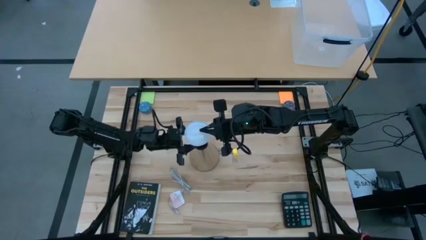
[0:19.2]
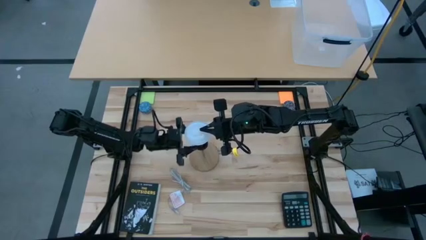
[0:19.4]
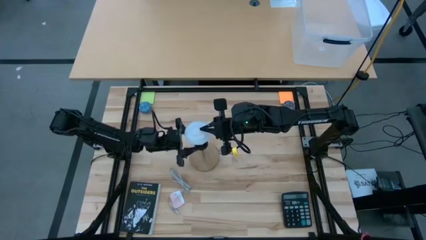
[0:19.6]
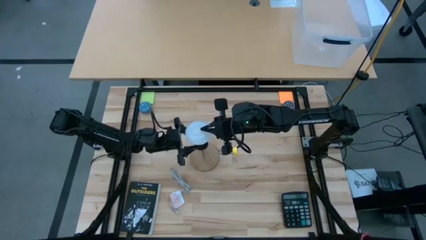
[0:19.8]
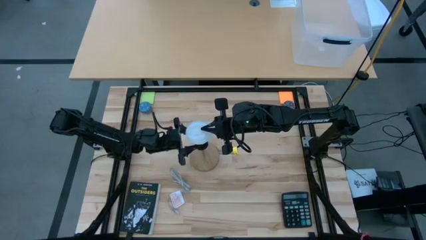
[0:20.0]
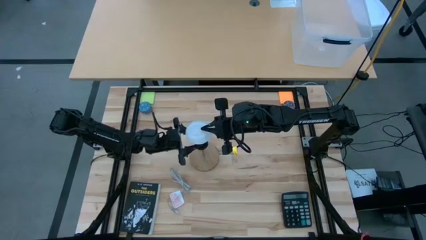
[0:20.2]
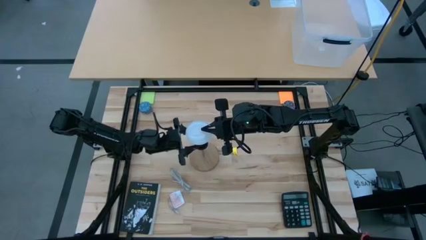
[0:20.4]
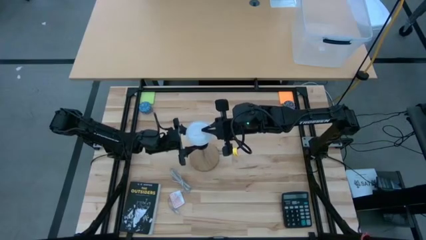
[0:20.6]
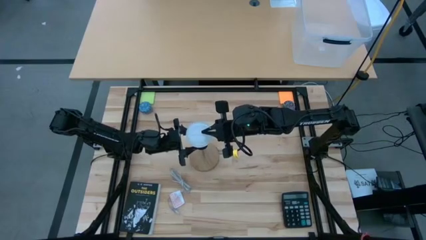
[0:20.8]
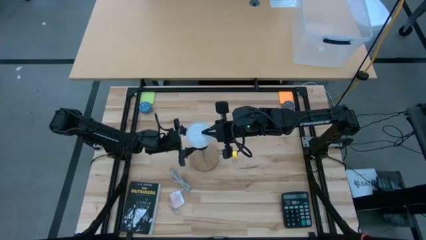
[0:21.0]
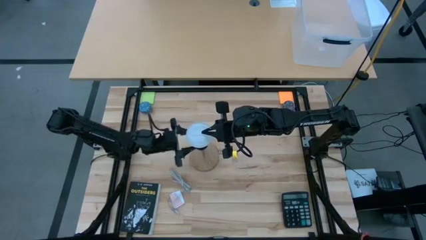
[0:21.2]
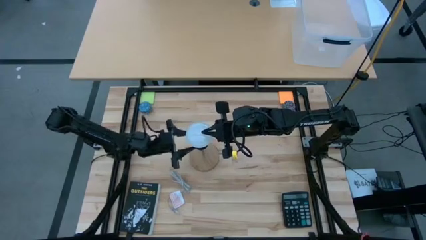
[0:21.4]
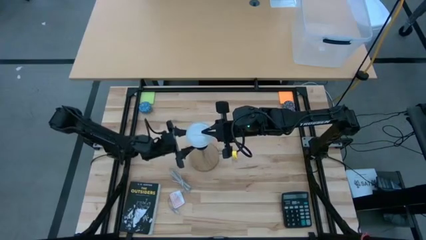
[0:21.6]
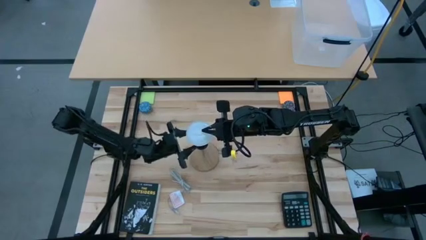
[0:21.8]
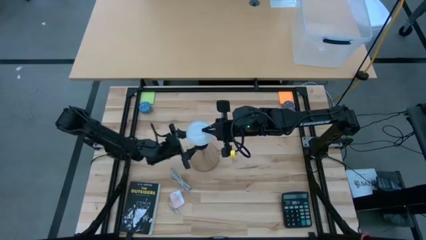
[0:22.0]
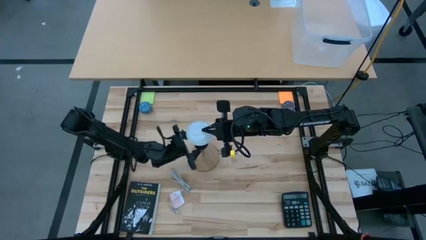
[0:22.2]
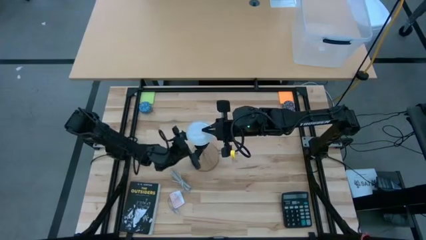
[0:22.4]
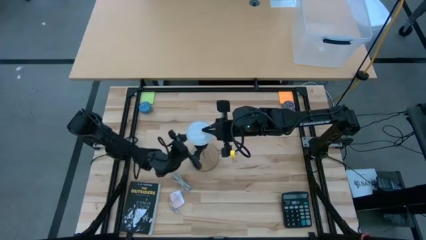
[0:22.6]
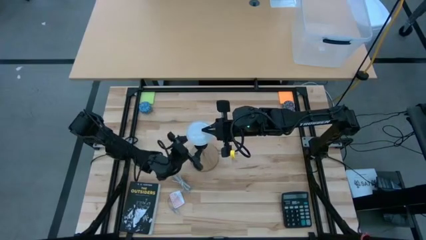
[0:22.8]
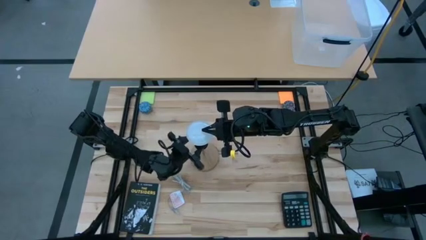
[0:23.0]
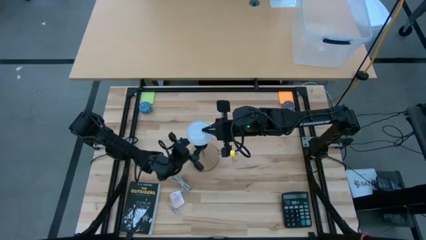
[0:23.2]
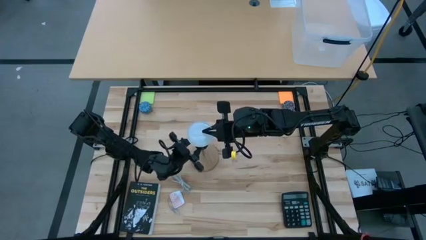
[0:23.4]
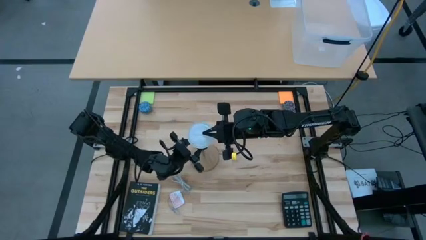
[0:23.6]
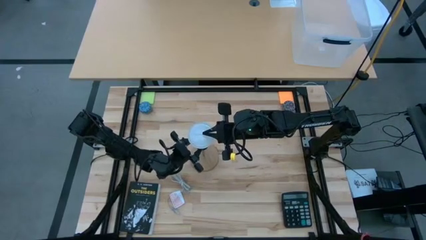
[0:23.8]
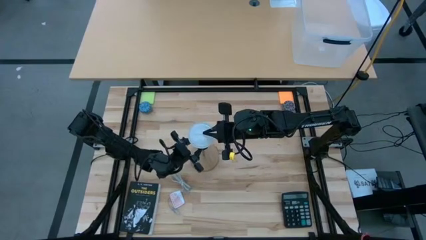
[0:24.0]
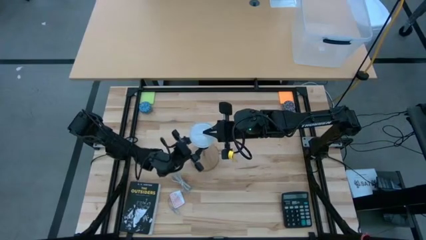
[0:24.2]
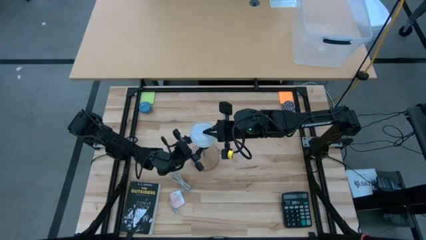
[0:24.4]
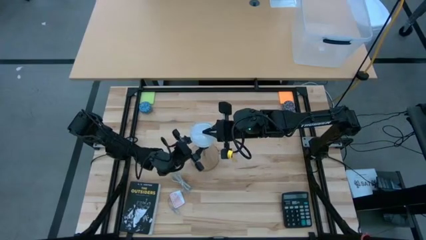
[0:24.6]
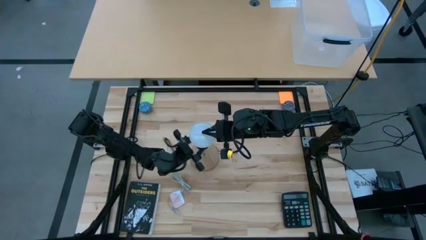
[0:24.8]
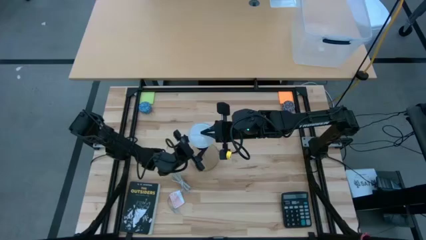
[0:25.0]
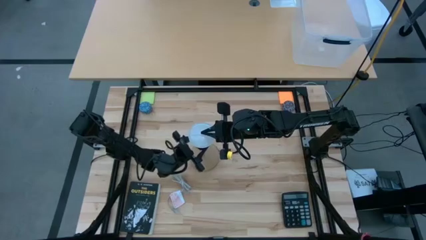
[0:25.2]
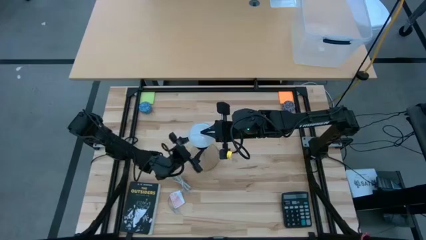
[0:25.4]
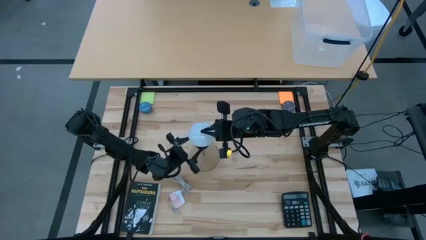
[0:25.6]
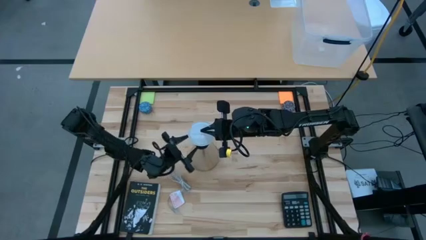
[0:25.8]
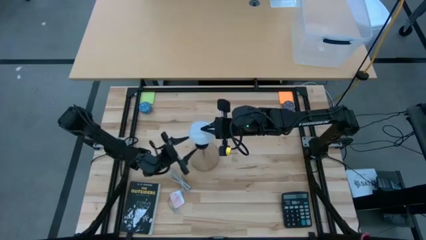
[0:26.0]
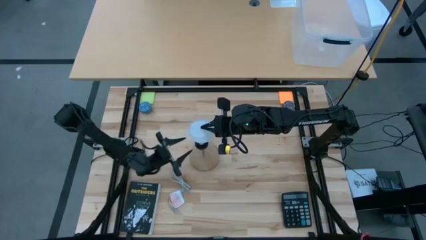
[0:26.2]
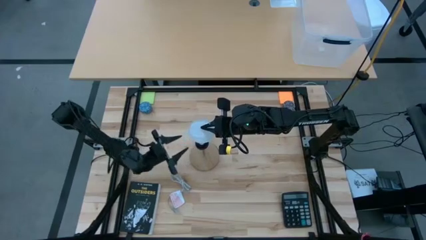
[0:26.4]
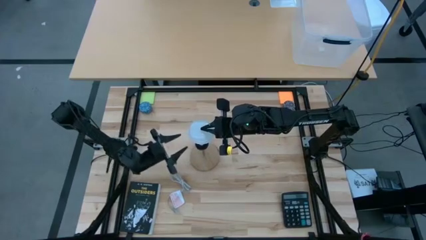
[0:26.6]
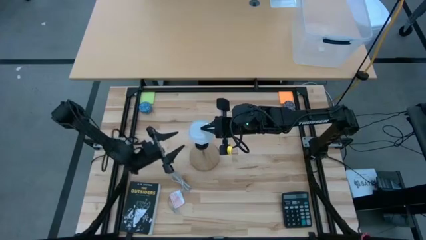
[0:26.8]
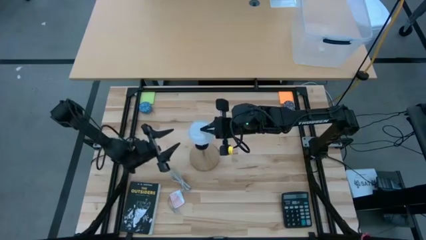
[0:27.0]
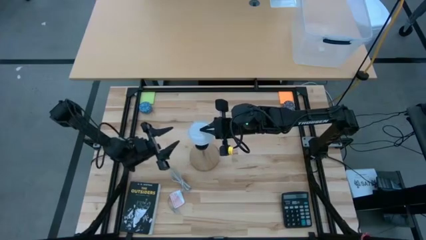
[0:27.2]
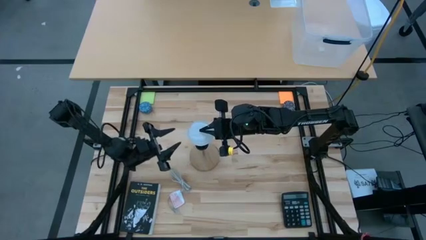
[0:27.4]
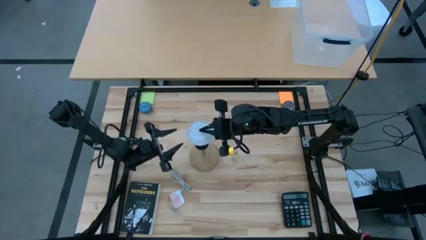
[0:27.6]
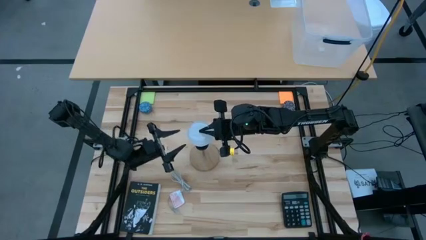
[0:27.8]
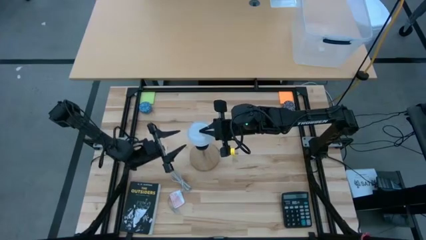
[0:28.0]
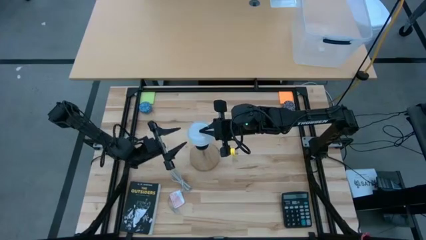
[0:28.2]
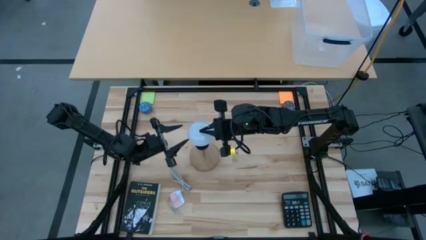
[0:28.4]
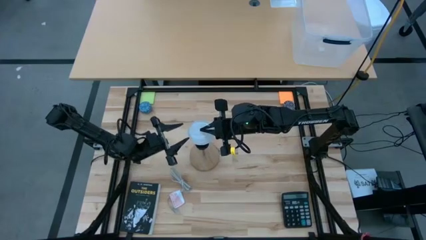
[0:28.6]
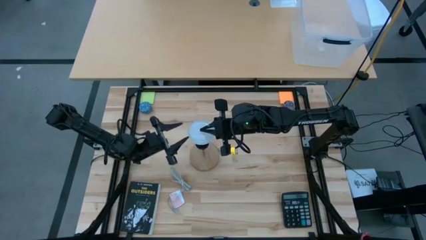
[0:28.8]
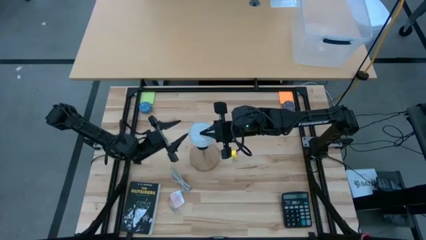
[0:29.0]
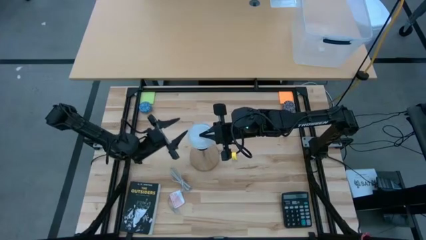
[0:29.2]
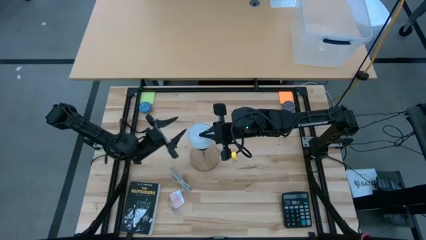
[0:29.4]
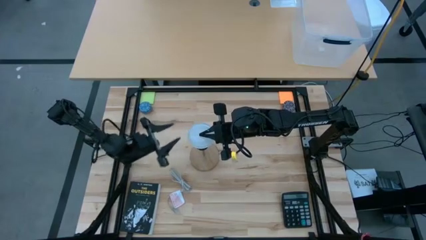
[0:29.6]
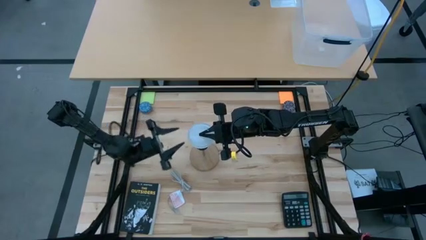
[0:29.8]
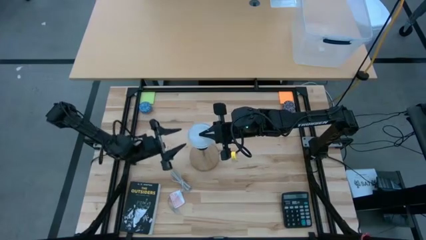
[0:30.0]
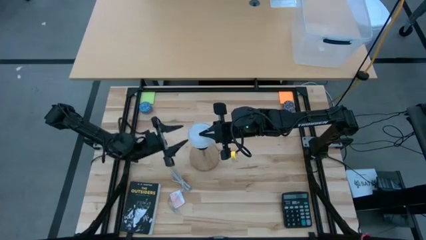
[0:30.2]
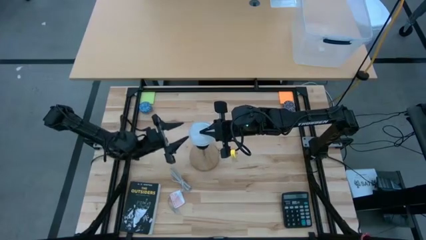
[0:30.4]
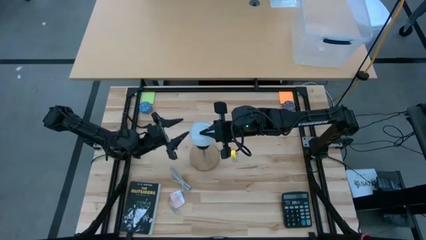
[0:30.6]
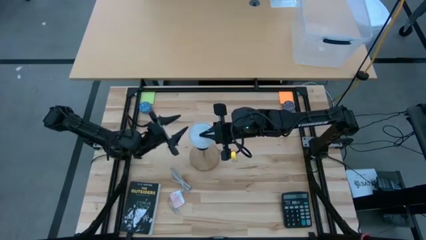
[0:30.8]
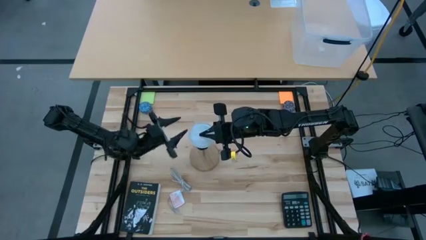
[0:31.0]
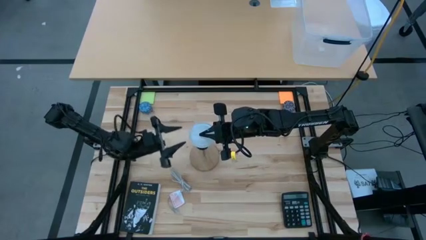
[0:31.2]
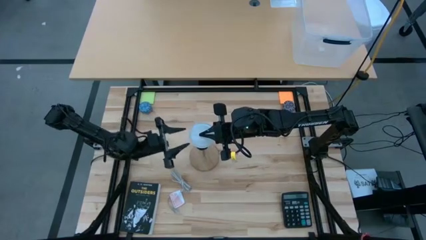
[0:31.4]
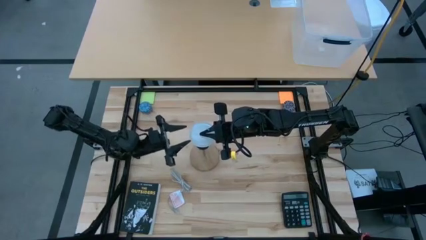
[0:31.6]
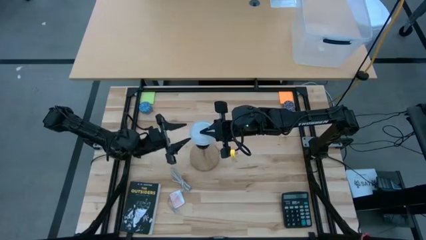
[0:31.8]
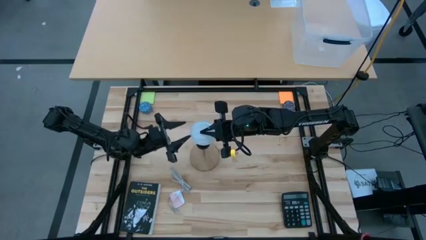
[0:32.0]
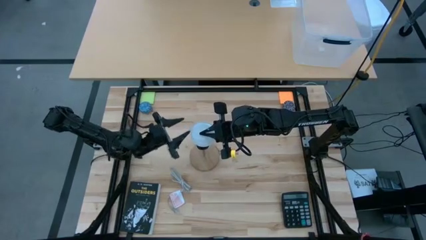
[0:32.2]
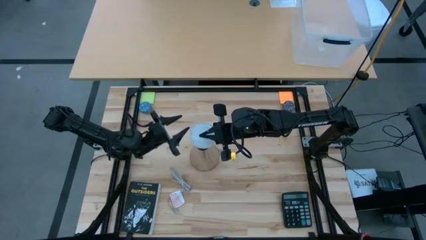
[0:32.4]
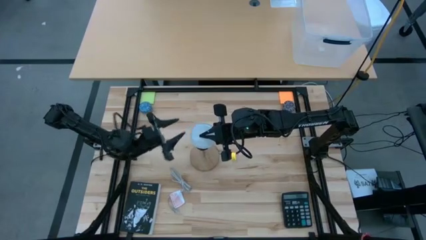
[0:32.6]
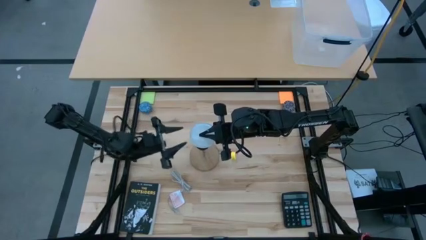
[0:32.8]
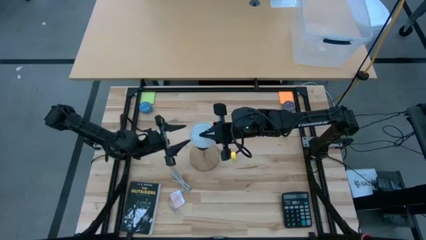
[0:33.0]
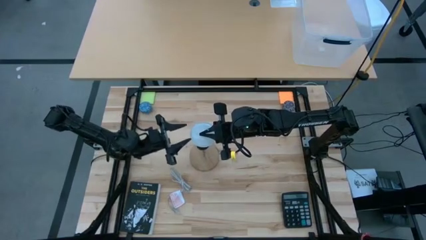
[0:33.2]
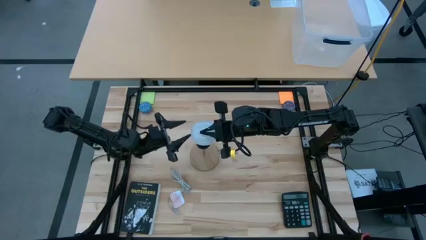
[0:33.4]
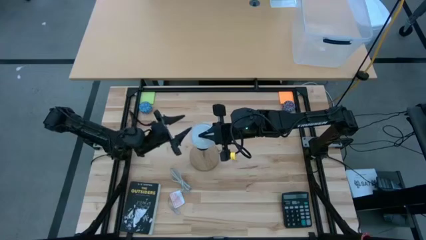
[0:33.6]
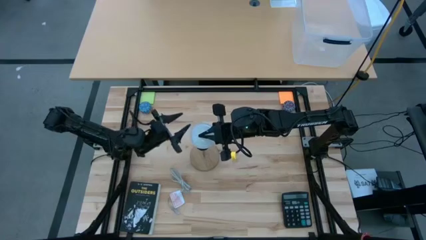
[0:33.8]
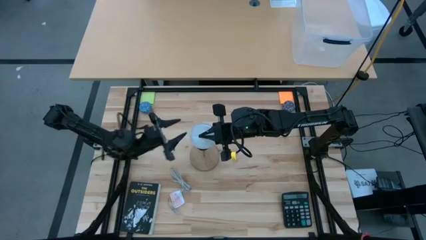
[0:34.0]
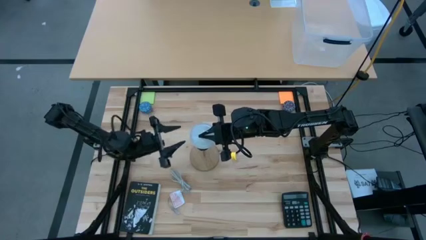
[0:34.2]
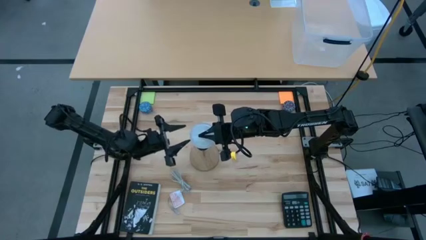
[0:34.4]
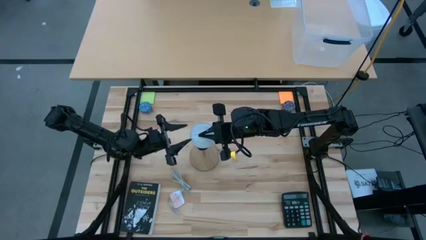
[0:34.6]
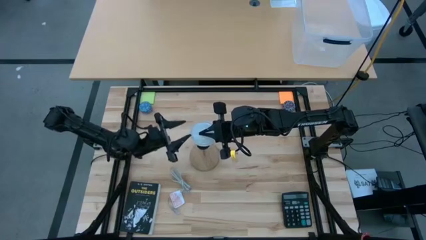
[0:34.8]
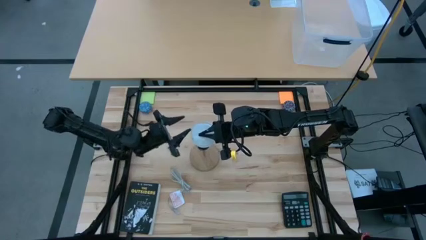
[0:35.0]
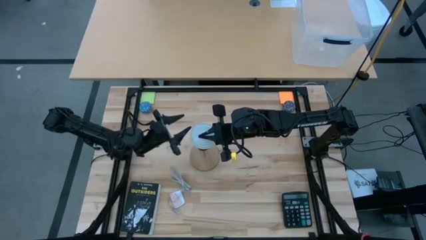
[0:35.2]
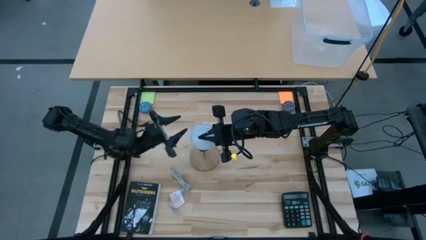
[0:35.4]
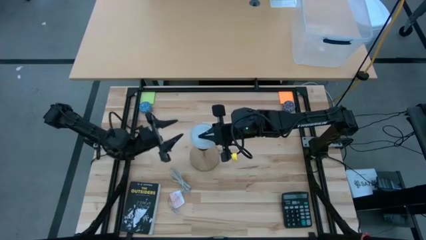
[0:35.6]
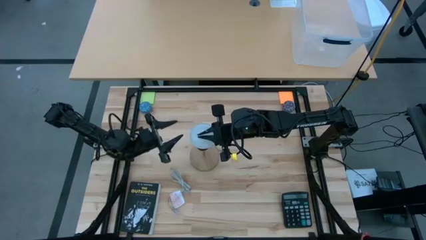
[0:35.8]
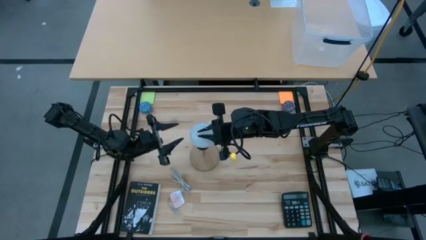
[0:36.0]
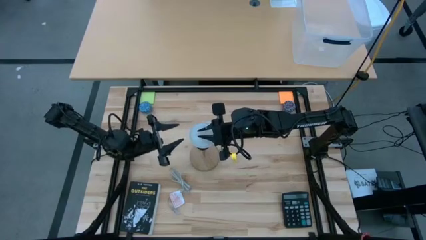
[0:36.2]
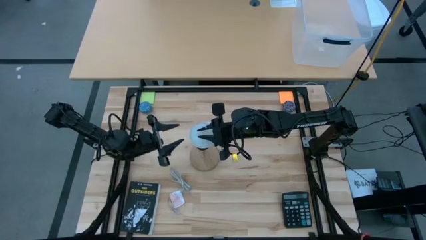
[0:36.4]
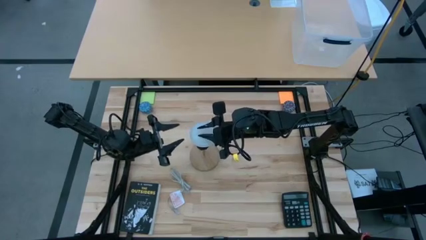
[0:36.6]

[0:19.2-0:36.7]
Task: Screw lightbulb
Insert the lightbulb on the lamp
